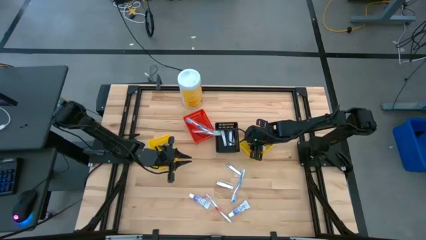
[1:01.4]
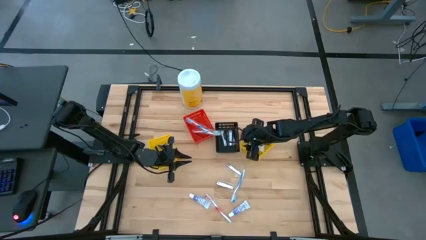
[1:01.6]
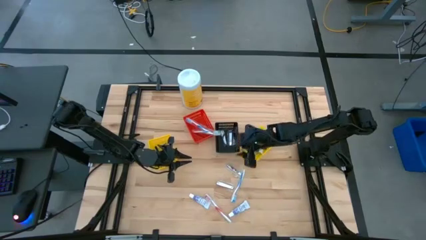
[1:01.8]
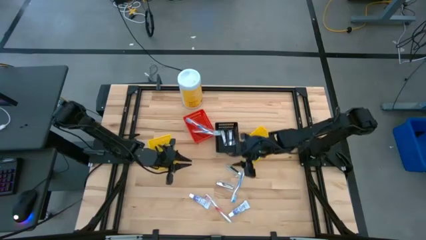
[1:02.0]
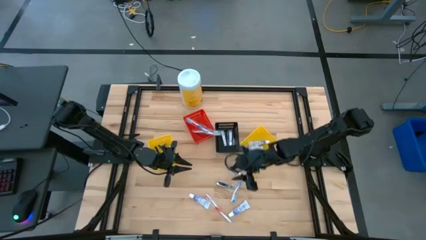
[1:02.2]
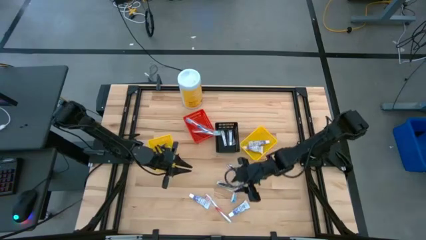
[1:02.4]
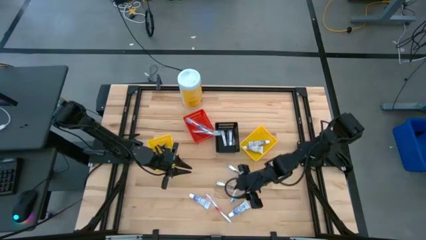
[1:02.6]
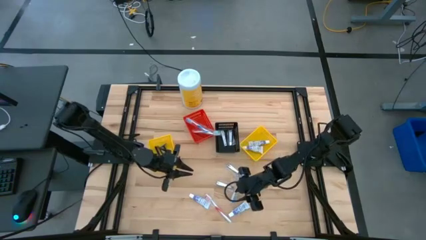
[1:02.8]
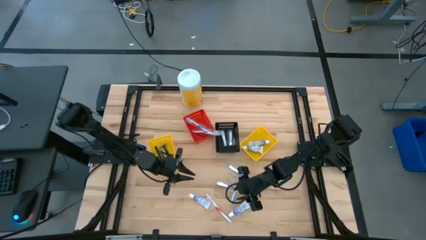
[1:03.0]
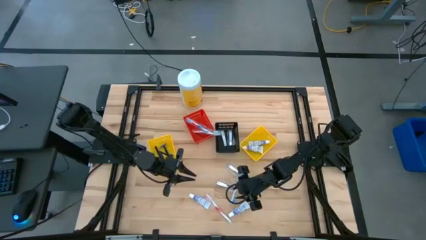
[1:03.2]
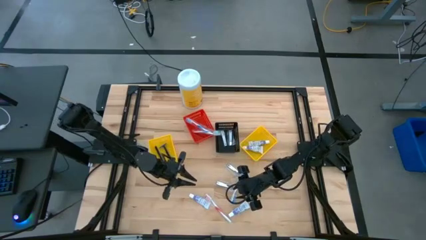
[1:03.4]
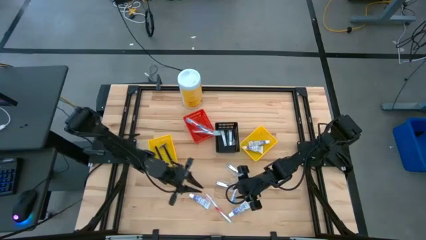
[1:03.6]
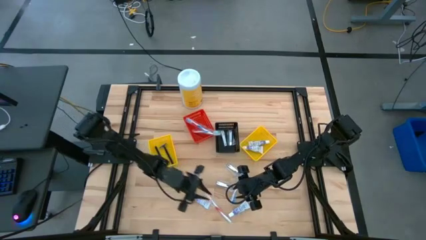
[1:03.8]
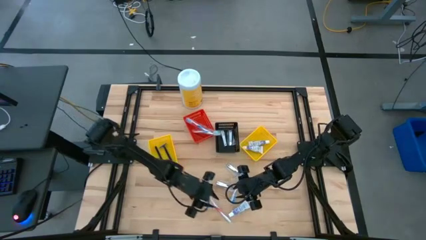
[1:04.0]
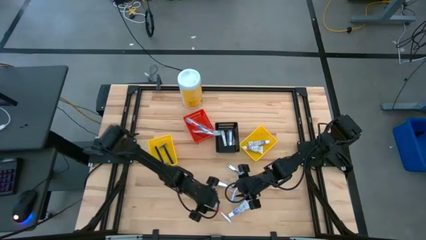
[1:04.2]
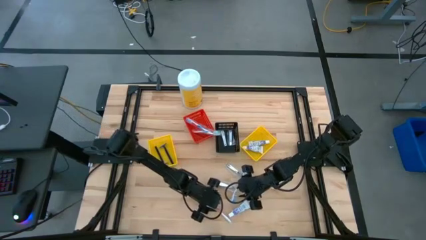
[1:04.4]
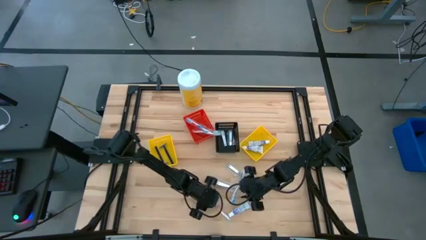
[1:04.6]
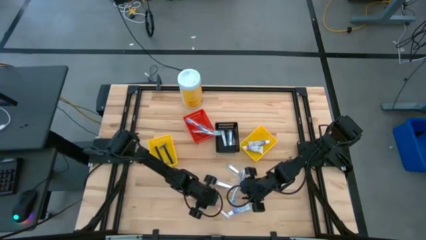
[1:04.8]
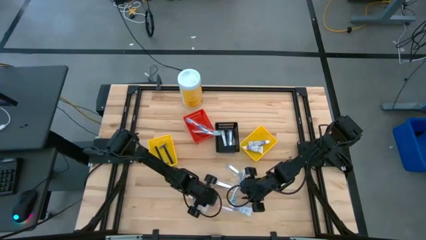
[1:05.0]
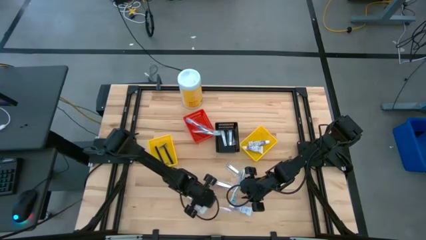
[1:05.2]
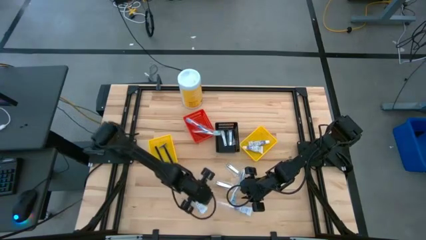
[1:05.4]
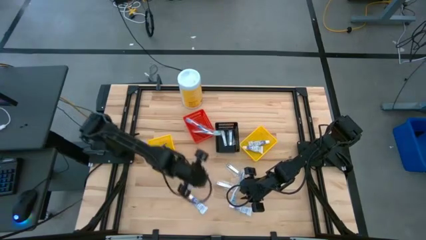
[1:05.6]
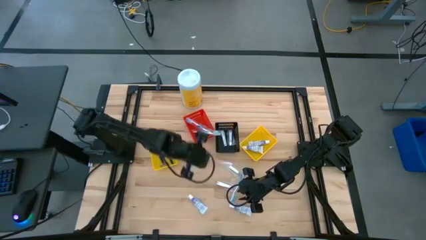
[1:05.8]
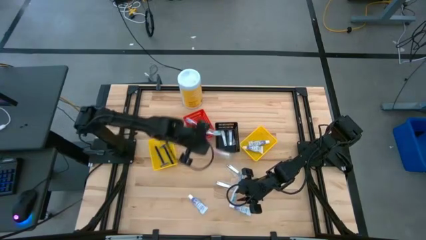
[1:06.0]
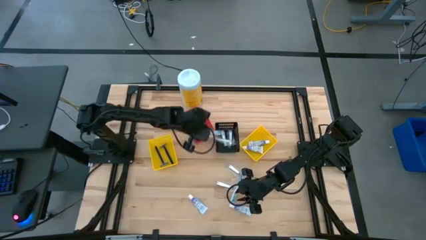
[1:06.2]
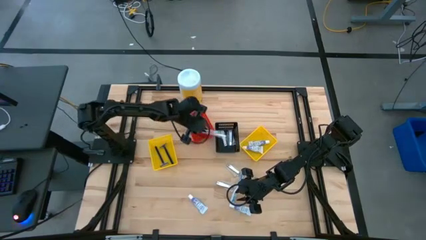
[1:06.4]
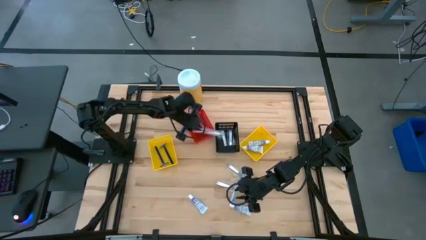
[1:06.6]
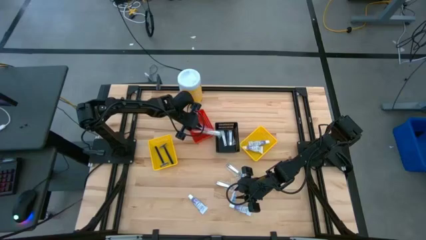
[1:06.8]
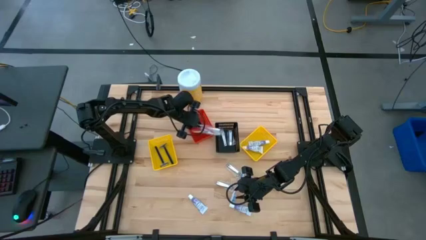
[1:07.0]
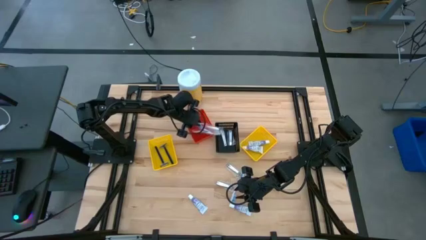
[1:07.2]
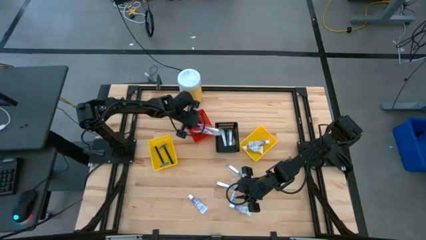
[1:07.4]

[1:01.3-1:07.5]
Task: Pick & Place Travel size toiletries
Put the red toothbrush into the red bin

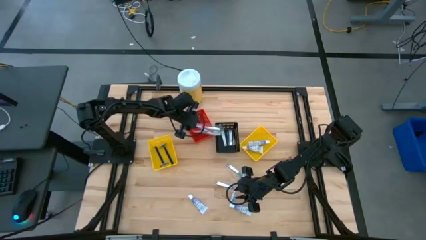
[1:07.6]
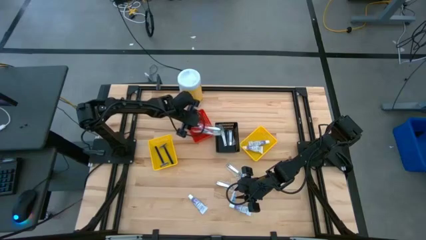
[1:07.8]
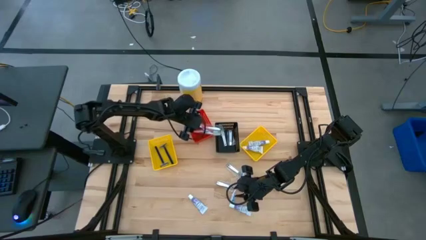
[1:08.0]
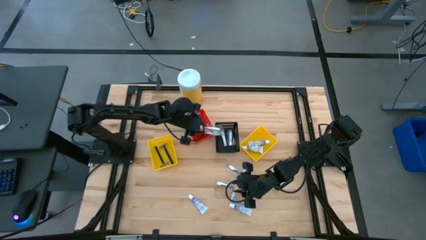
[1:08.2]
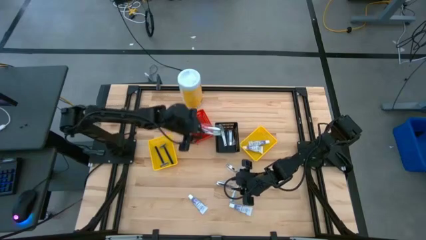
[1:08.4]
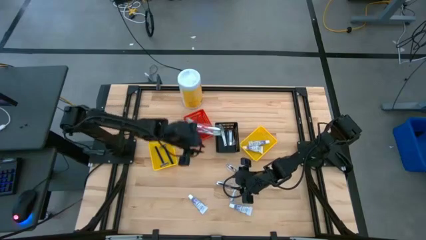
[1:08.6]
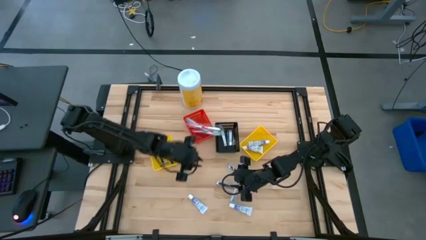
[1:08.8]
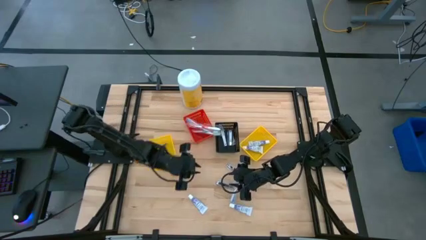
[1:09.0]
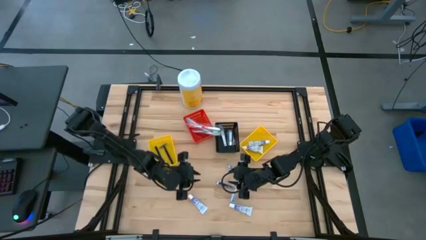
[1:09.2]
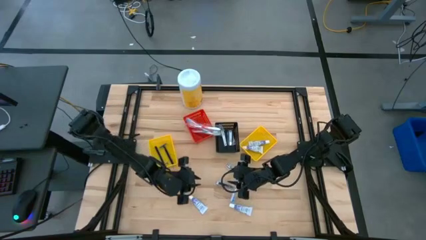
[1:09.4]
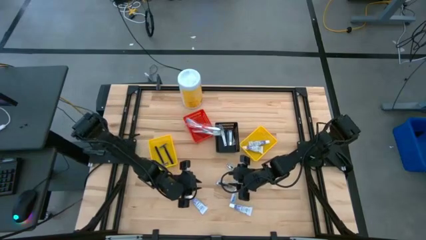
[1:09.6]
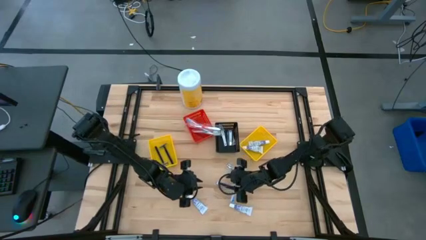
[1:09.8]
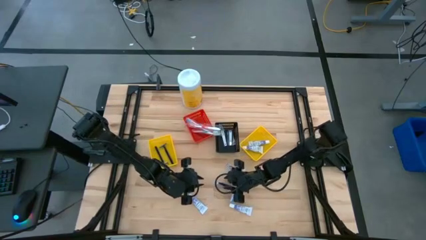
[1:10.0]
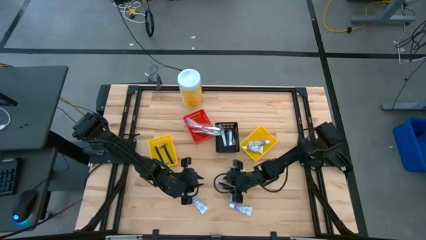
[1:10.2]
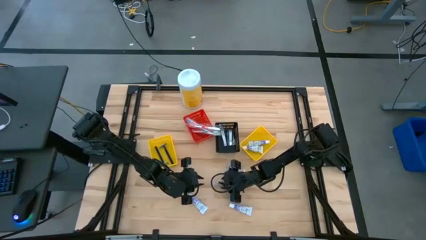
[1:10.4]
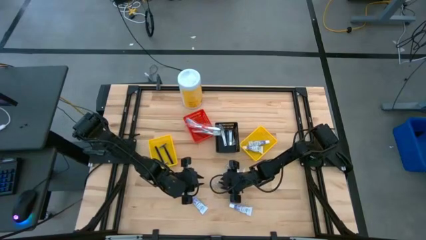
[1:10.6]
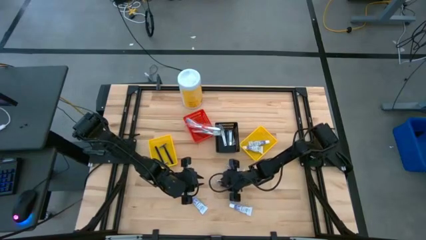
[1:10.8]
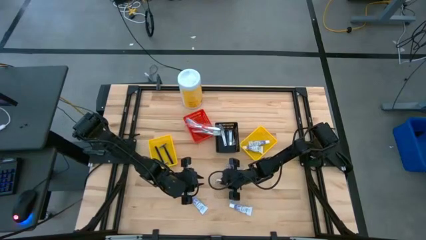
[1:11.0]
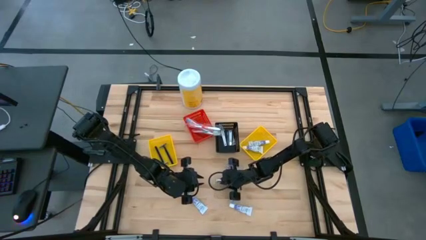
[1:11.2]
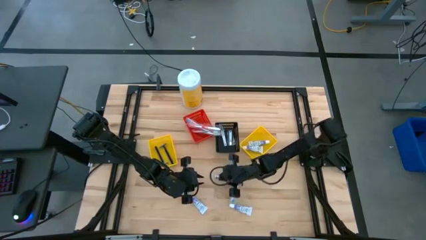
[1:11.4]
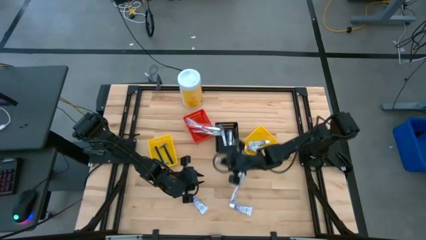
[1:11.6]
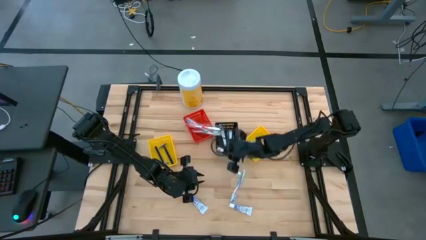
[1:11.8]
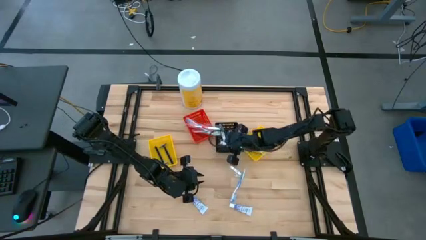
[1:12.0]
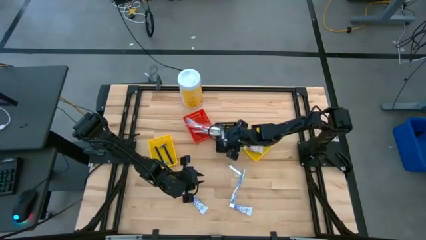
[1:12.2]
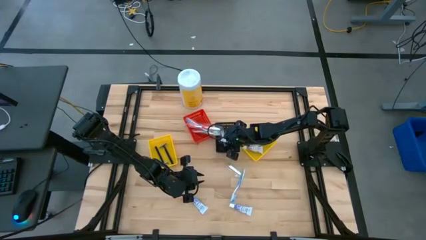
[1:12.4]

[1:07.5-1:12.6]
Put the silver nail cutter into the black bin

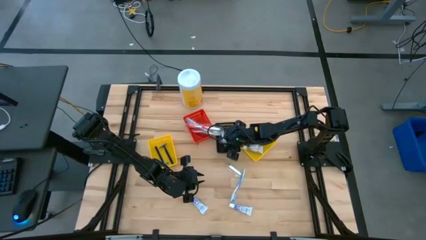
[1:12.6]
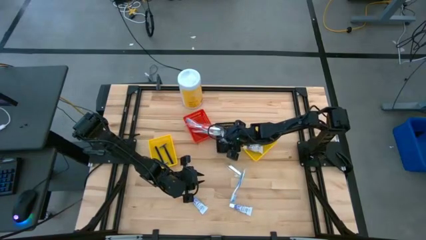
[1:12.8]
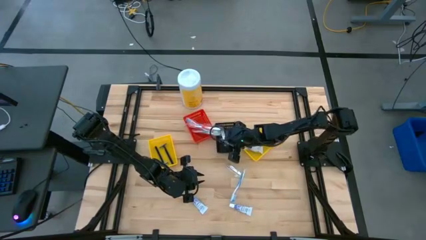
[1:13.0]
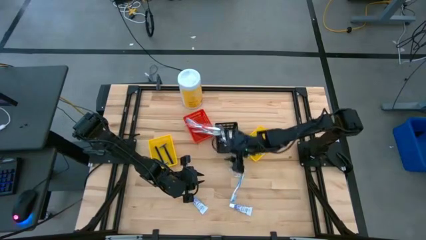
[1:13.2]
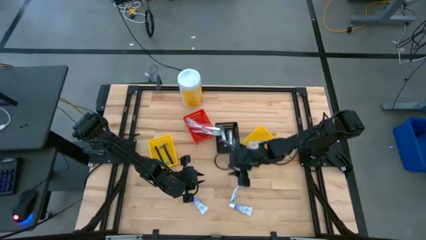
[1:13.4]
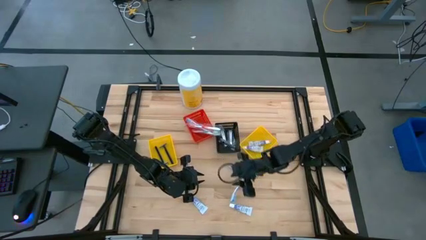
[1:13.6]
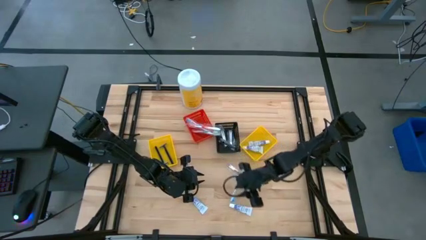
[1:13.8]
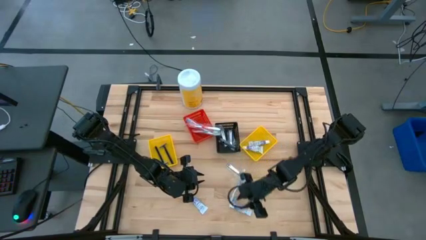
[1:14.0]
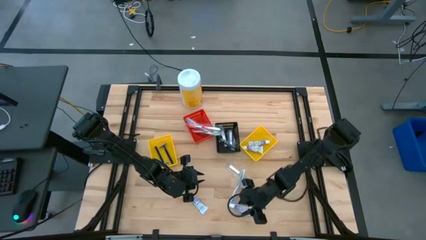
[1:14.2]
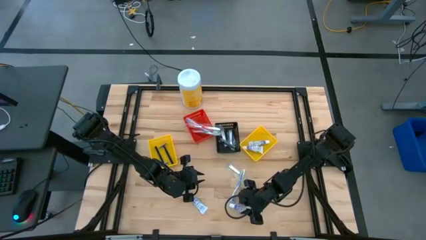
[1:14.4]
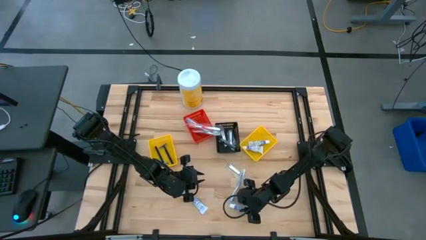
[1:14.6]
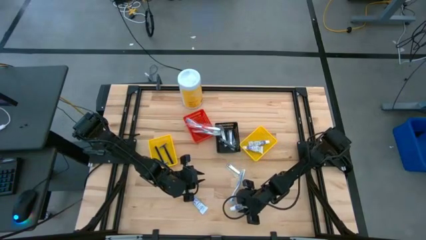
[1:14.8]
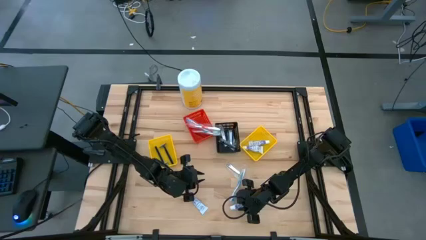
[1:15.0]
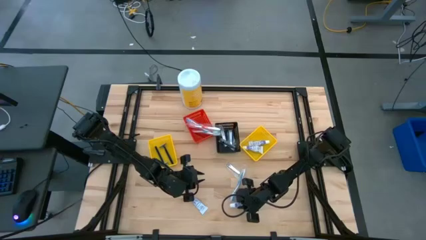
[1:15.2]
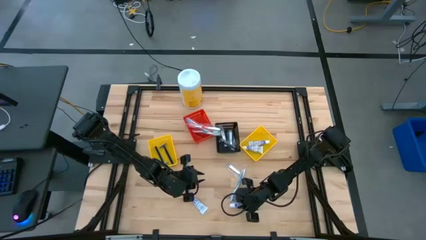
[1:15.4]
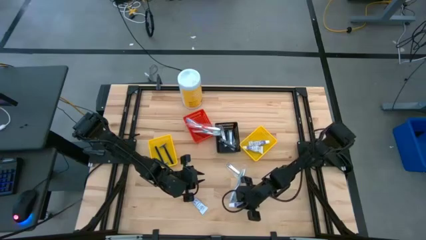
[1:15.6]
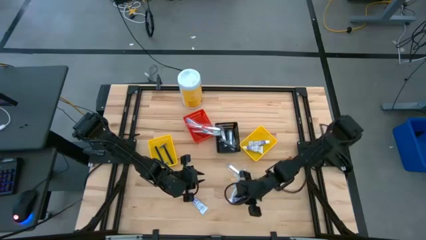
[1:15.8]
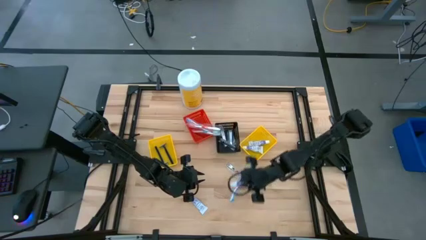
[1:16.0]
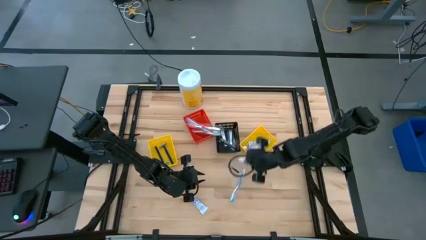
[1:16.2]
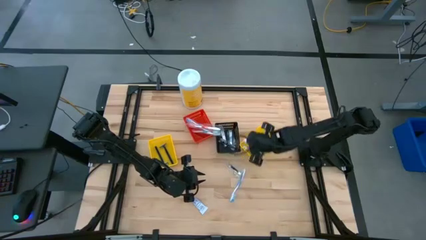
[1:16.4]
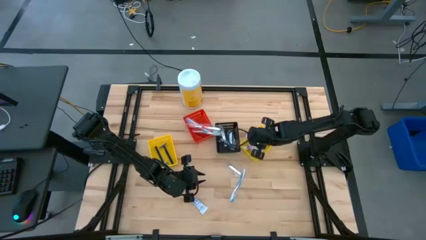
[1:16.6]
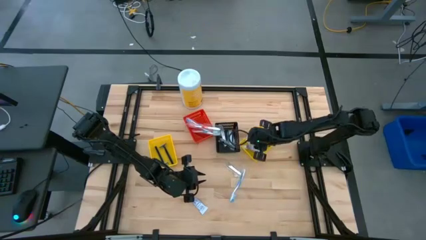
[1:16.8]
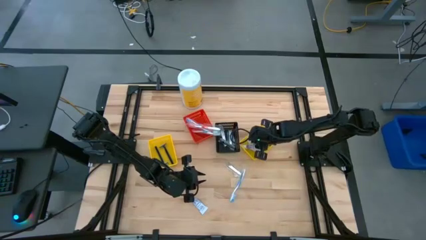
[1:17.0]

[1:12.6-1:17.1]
Put the white toothpaste into the right yellow bin

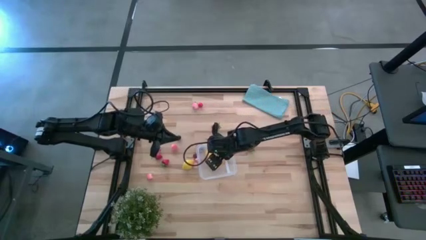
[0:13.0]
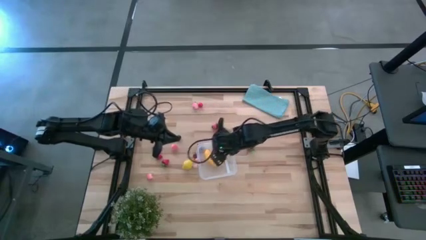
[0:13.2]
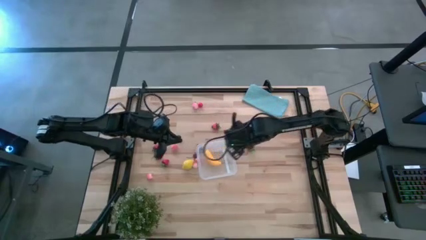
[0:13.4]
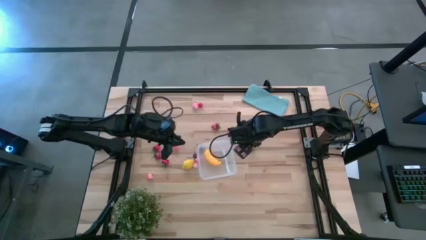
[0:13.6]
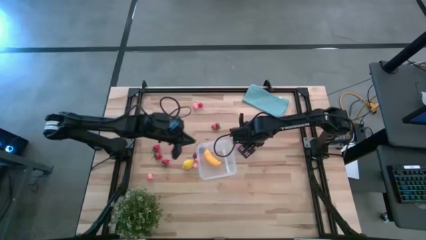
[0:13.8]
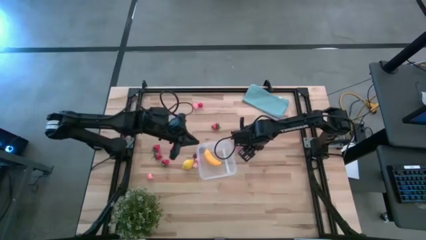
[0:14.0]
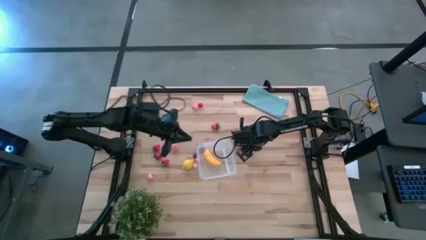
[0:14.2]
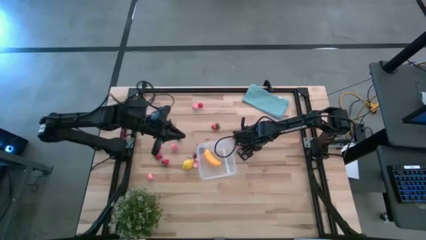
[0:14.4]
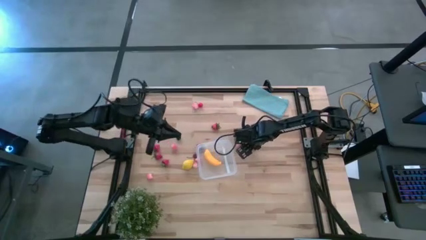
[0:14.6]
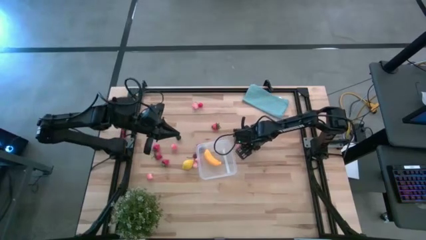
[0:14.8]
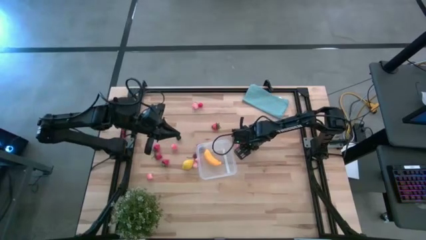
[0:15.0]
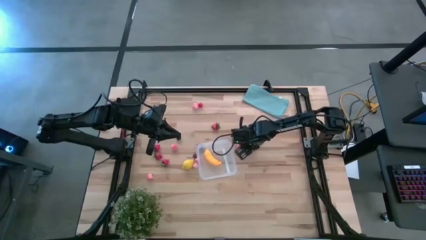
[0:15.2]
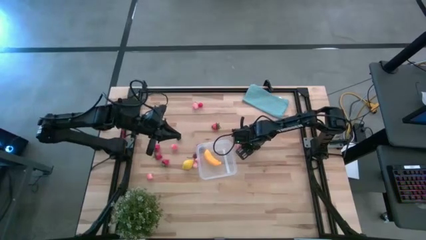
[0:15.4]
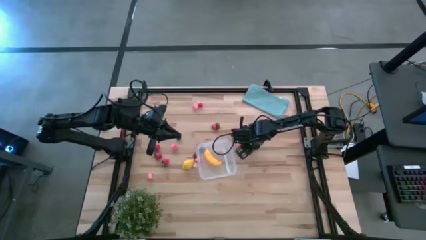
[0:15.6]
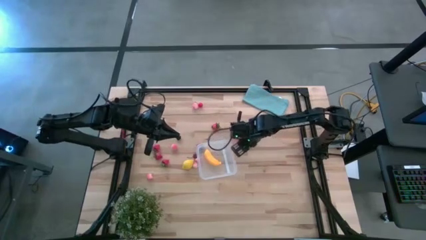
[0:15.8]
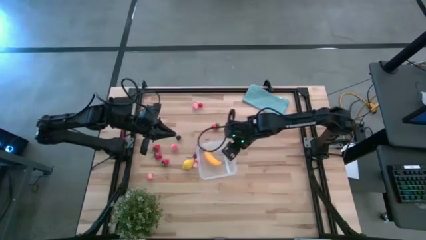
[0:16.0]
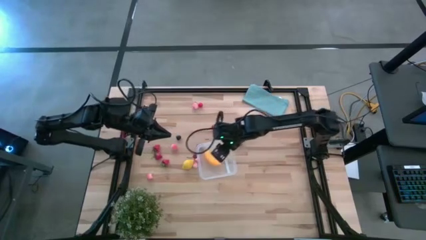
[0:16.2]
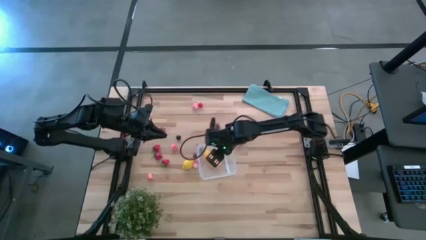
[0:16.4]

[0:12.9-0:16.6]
Task: Pick and placing Produce into tupperware
Put the red strawberry into the transparent bin
